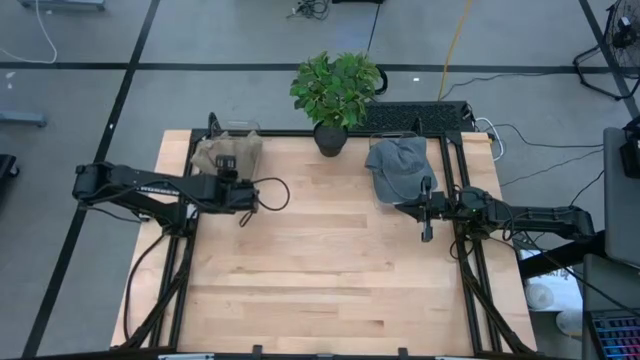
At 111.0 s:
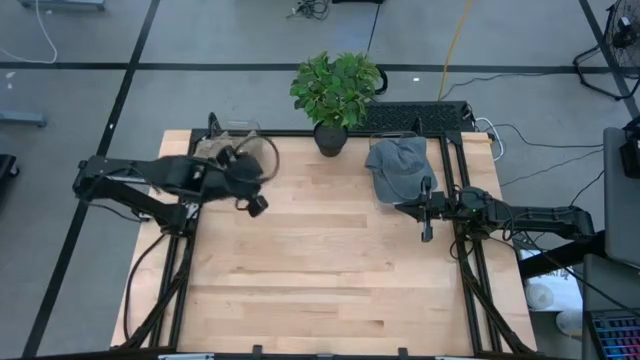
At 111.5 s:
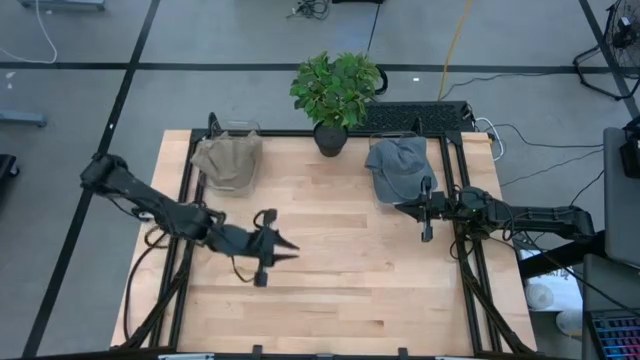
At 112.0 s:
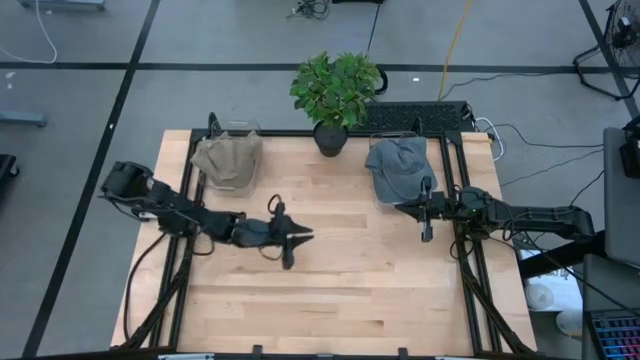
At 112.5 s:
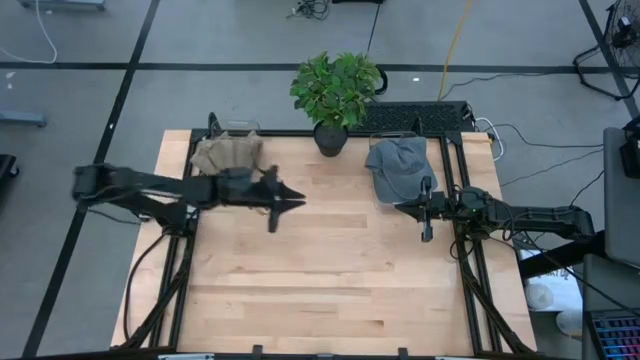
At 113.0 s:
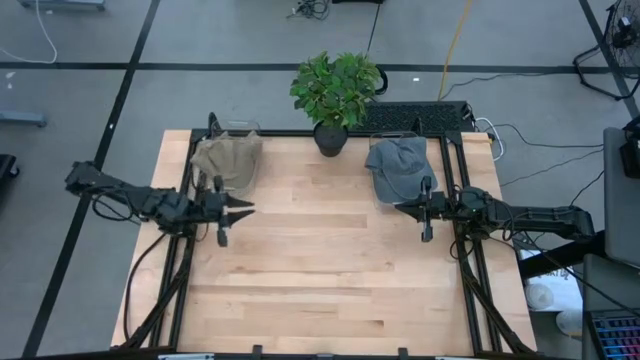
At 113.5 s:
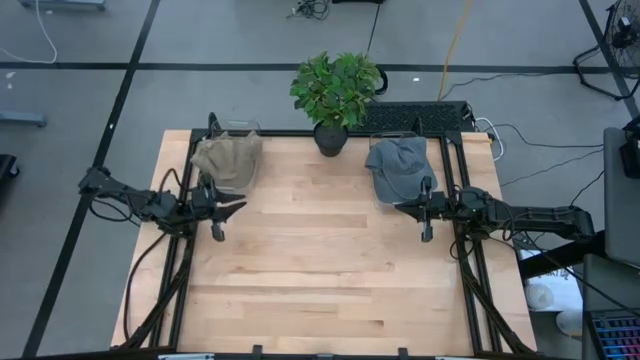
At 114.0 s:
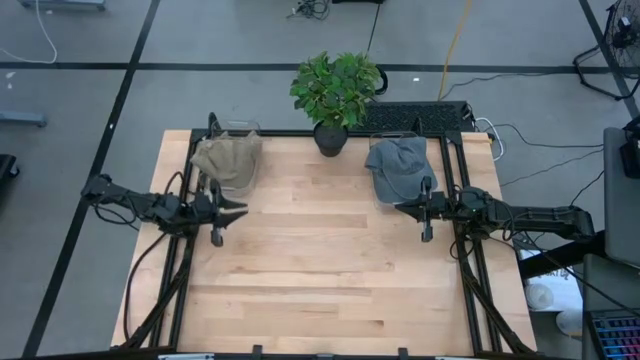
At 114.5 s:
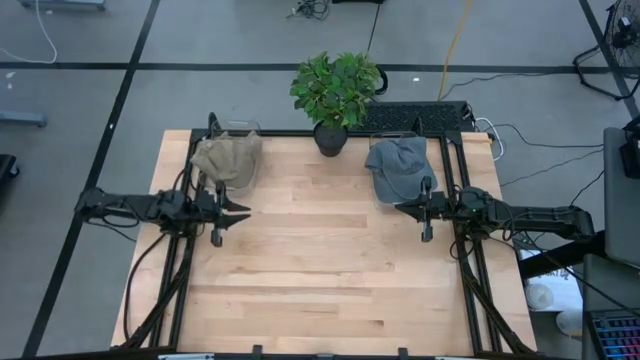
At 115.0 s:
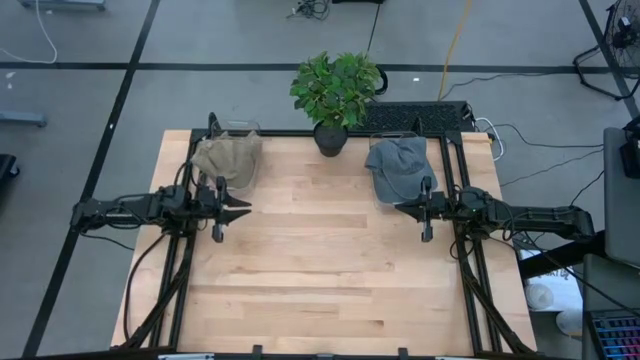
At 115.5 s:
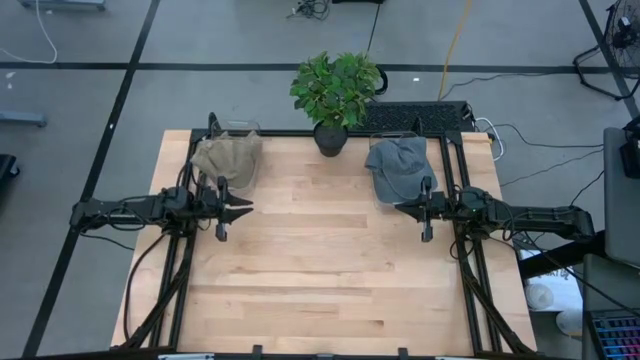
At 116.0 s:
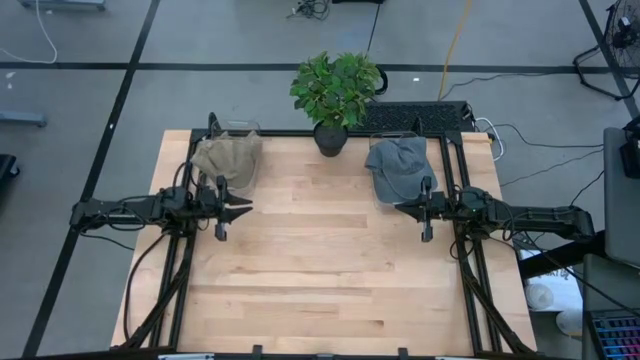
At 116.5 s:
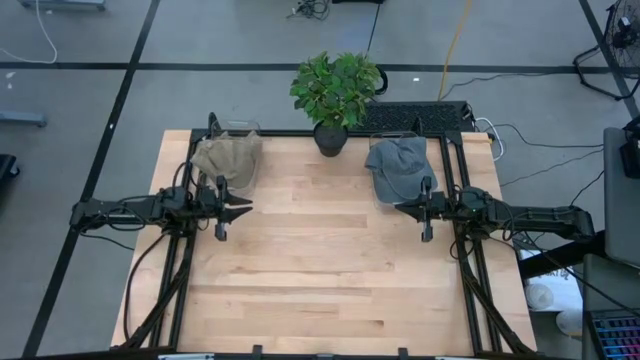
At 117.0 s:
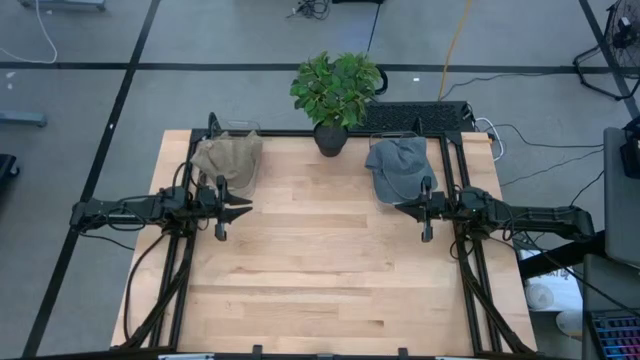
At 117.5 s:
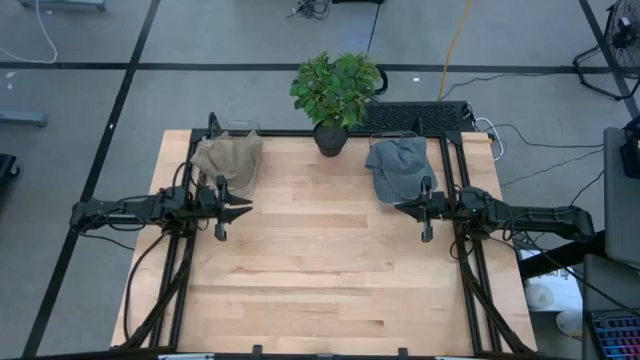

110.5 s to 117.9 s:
Task: Pick & Place hat
Return to Home Position

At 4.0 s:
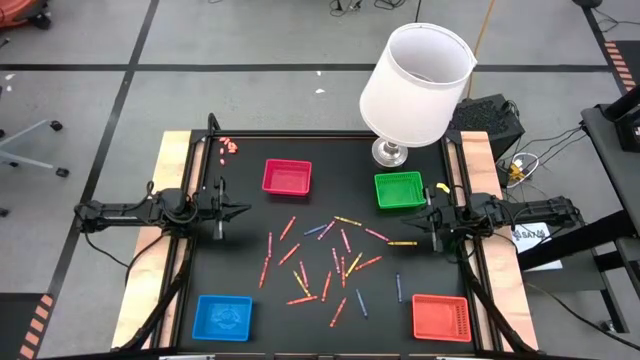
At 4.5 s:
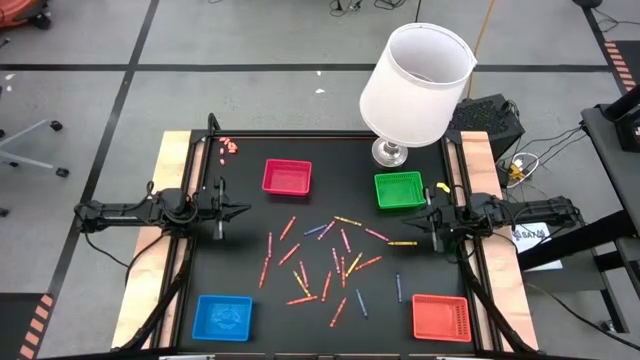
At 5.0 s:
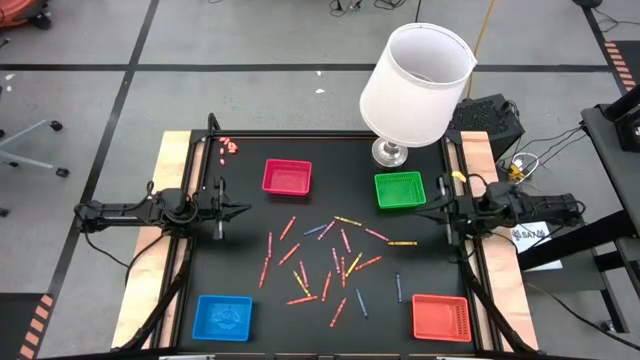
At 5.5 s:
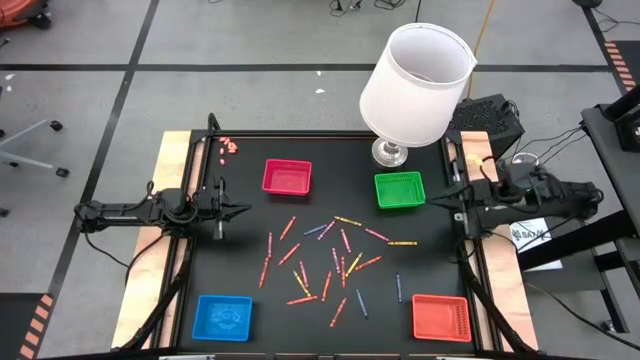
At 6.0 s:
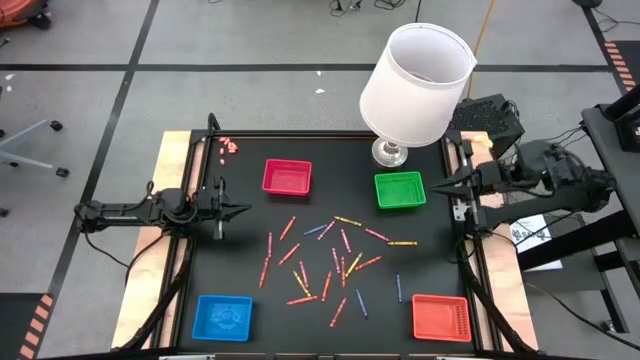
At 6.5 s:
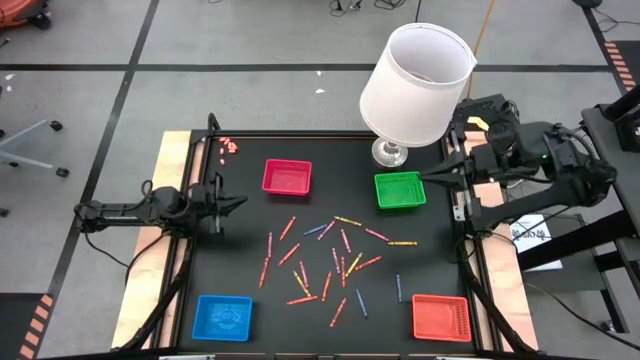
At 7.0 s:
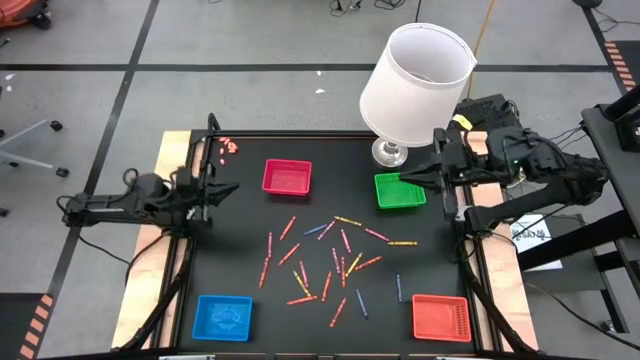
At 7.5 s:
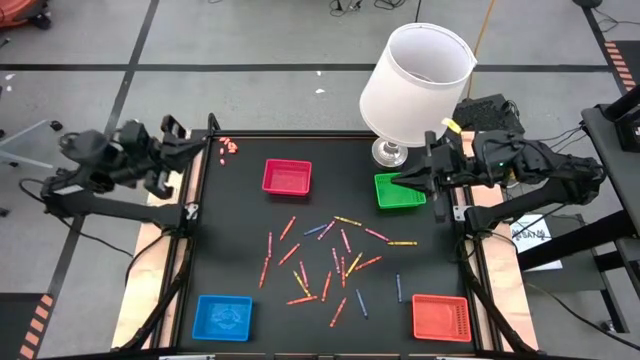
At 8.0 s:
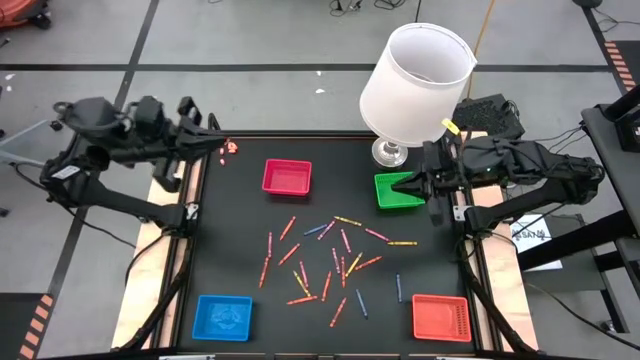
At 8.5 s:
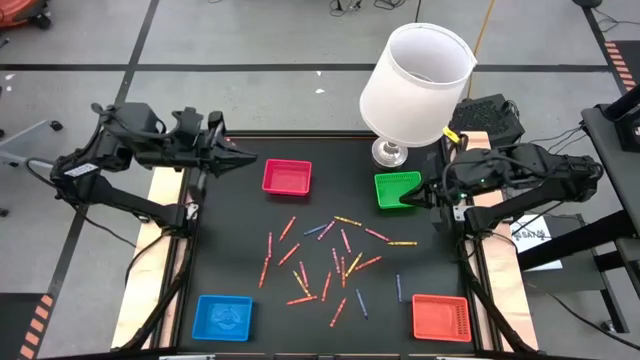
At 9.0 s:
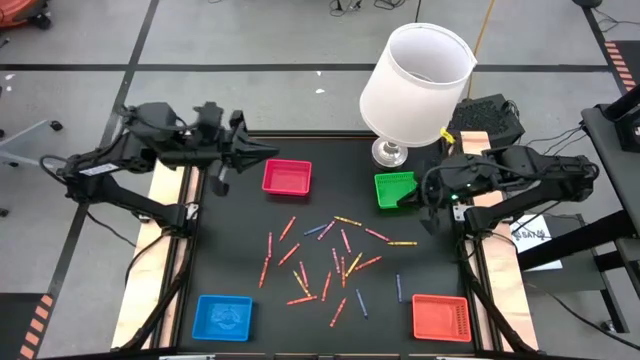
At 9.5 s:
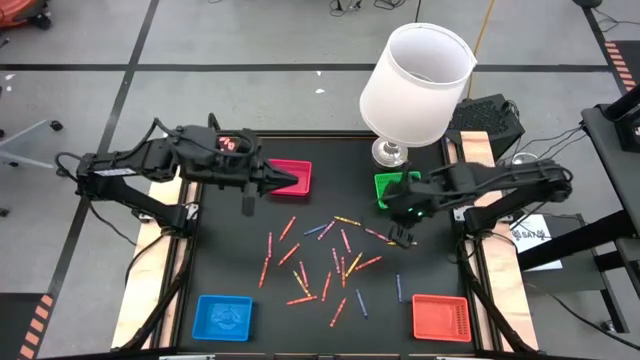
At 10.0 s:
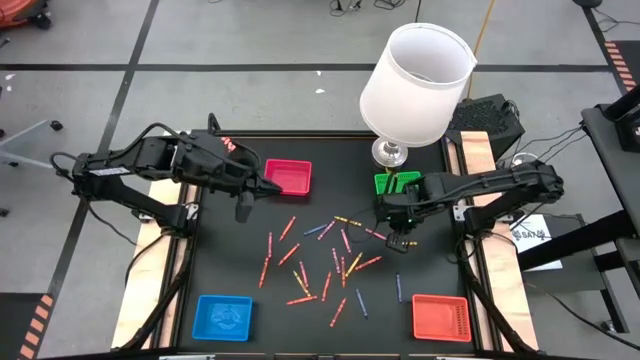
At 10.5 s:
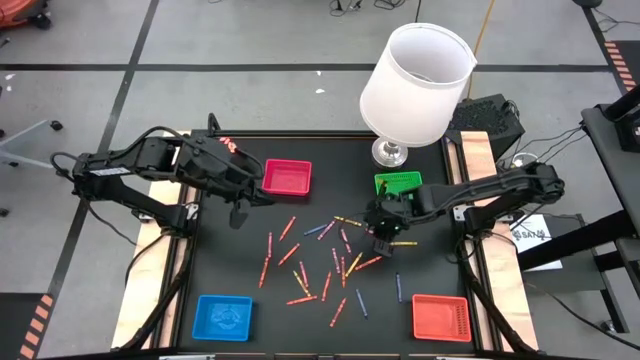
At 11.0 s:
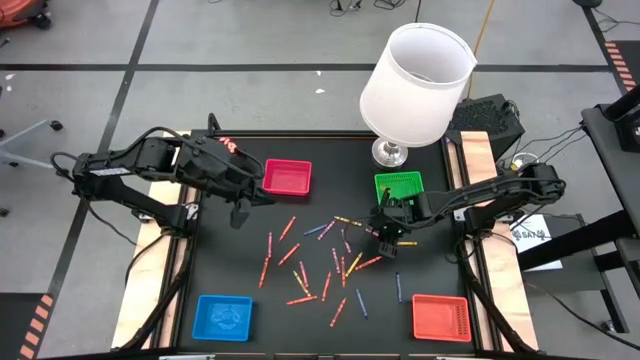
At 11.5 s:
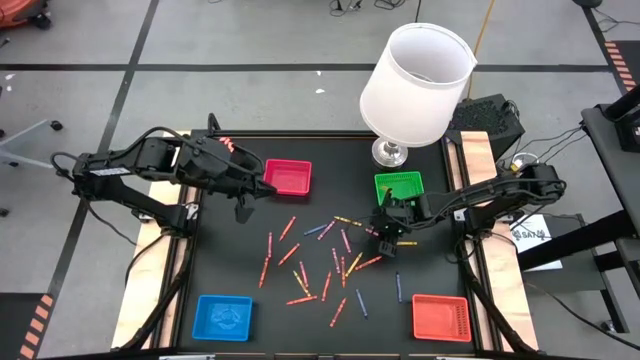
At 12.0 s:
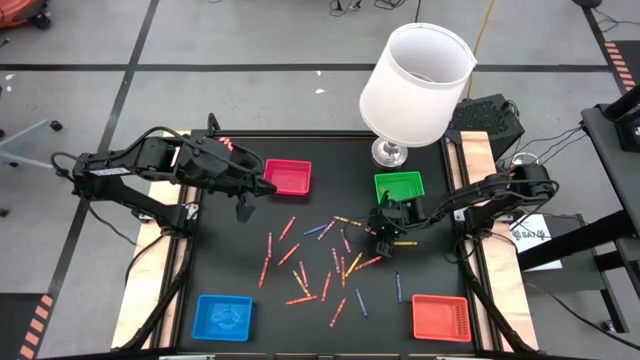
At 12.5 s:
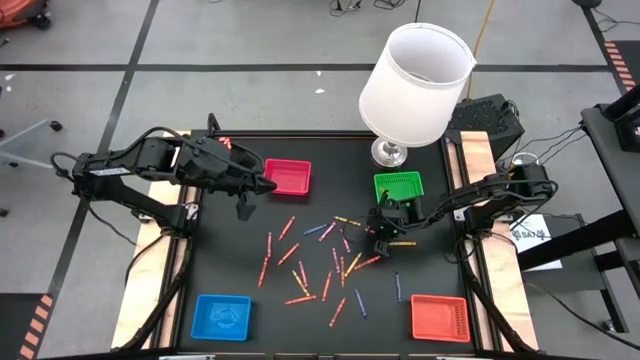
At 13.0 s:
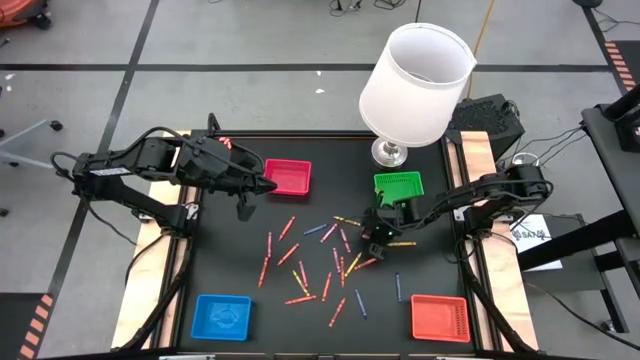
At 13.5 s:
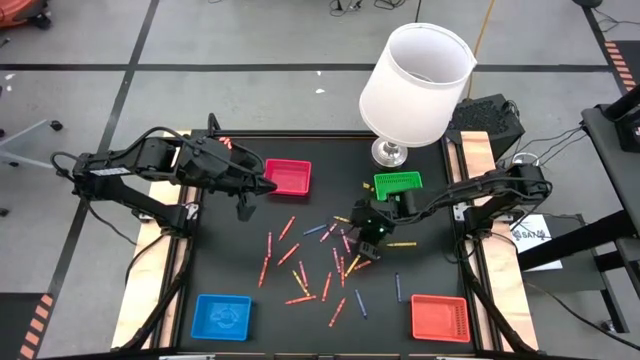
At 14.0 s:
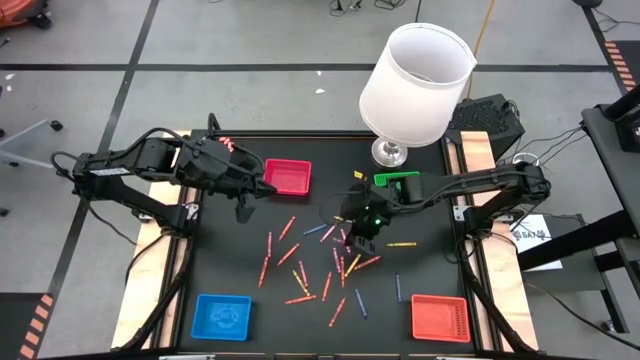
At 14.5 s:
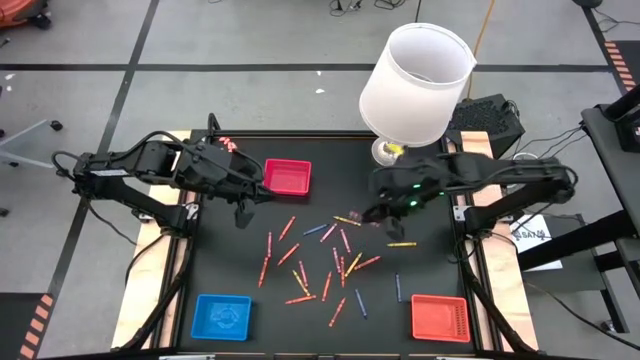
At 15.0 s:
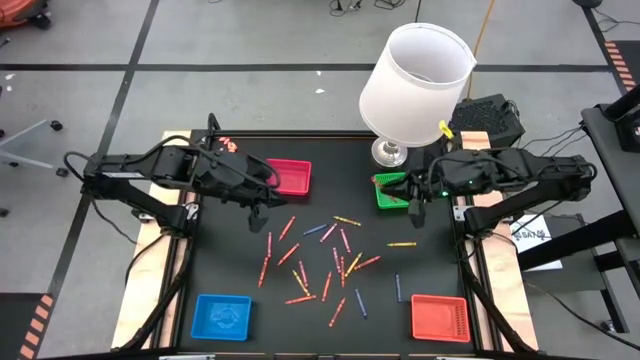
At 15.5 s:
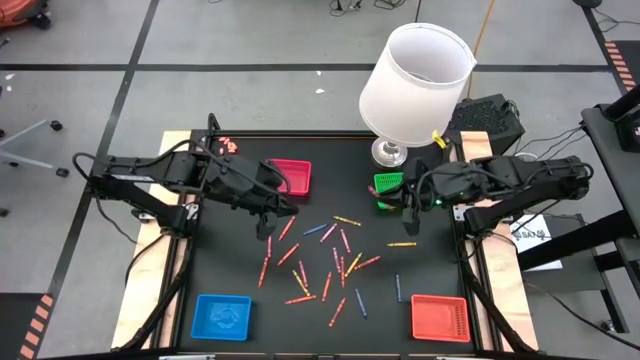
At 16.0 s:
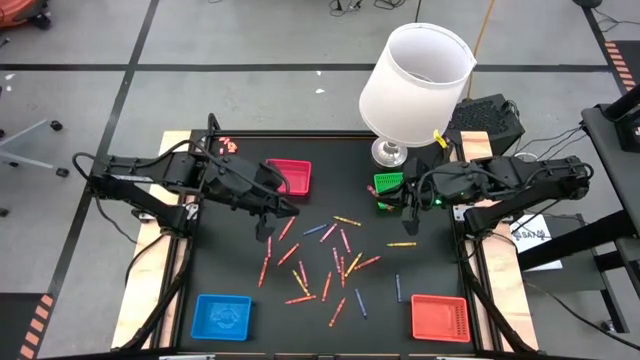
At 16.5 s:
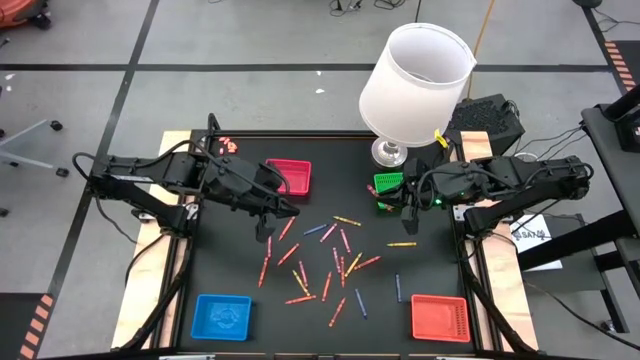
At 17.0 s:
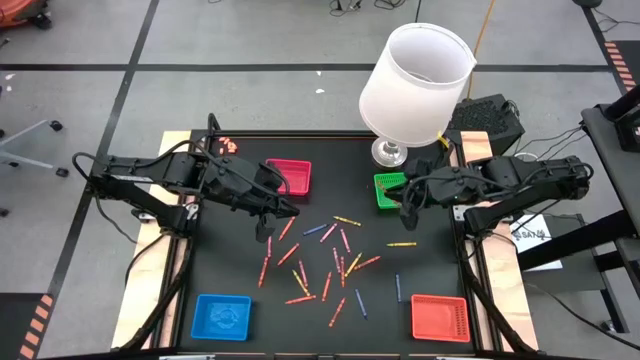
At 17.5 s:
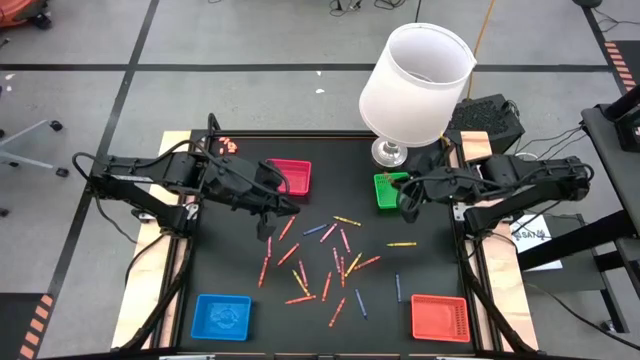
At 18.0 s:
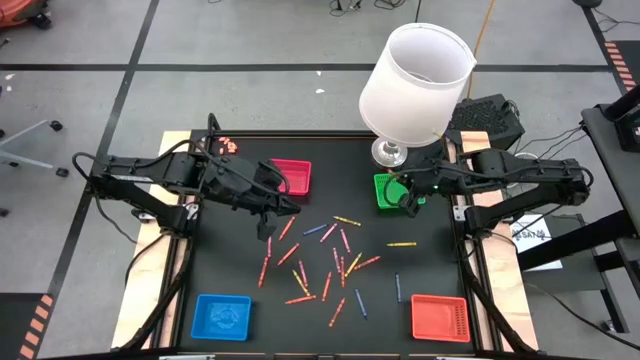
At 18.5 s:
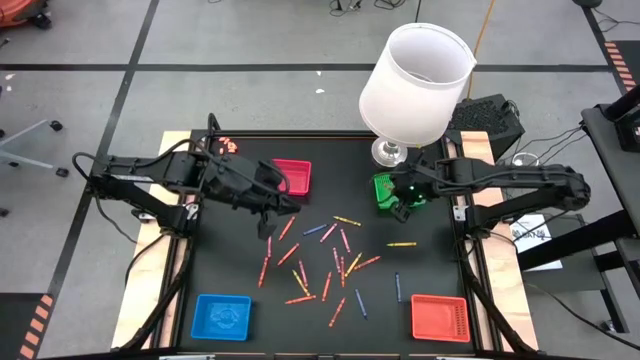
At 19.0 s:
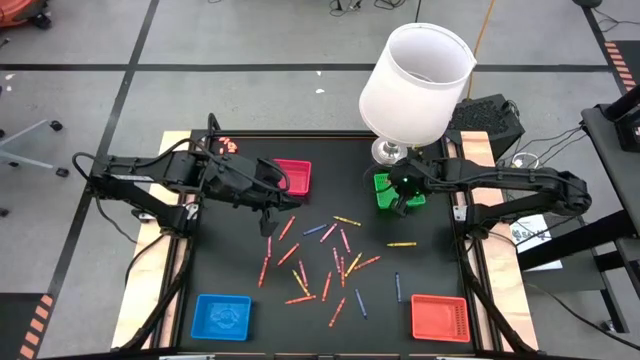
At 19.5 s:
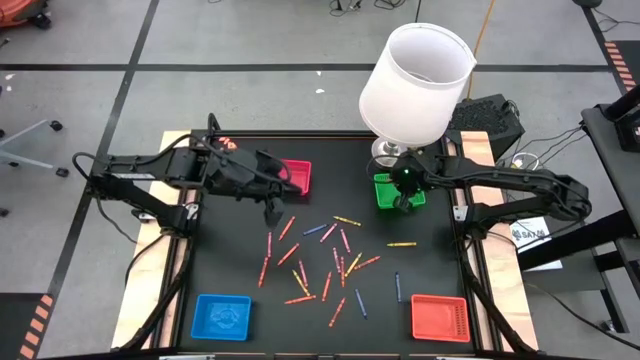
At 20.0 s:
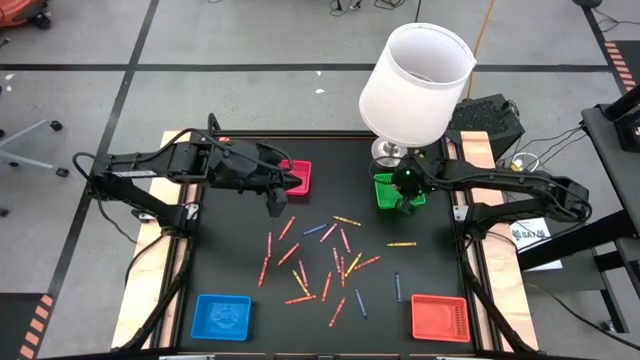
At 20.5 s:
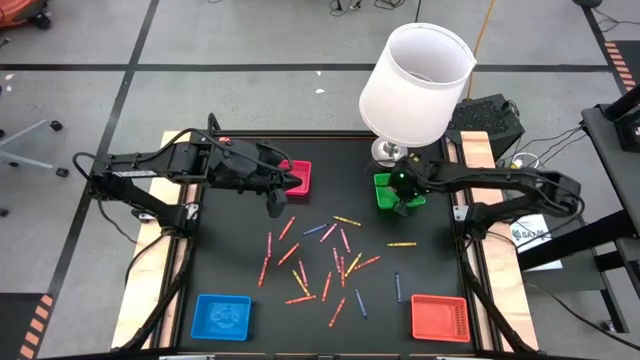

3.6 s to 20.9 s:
Task: Sort crayons
Put the red crayon into the green basket
